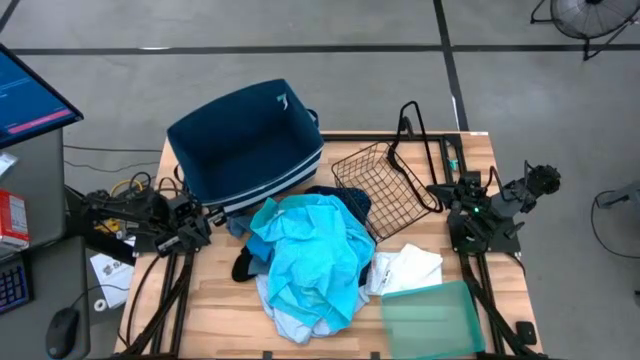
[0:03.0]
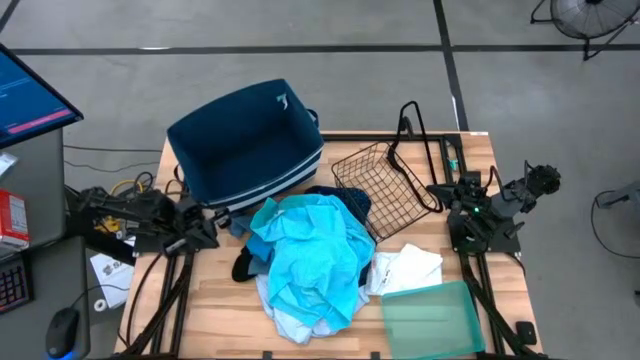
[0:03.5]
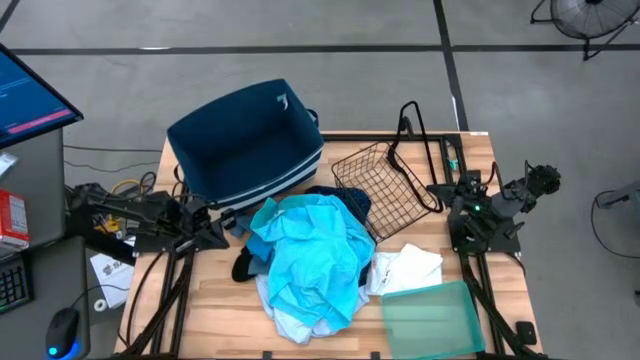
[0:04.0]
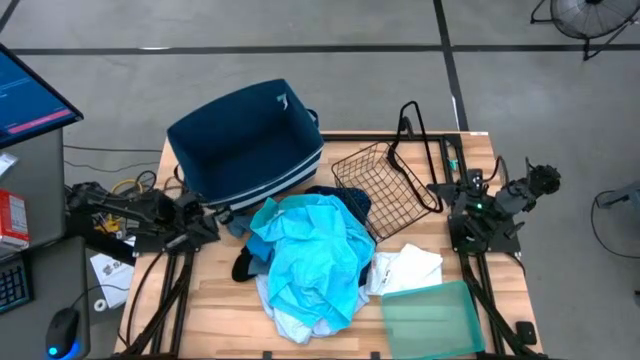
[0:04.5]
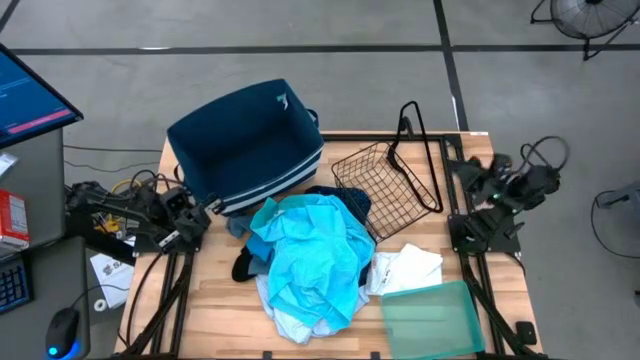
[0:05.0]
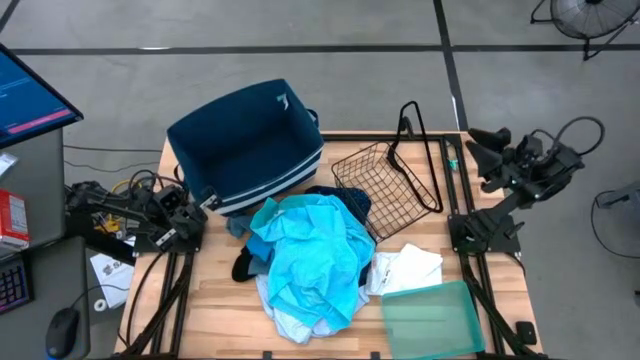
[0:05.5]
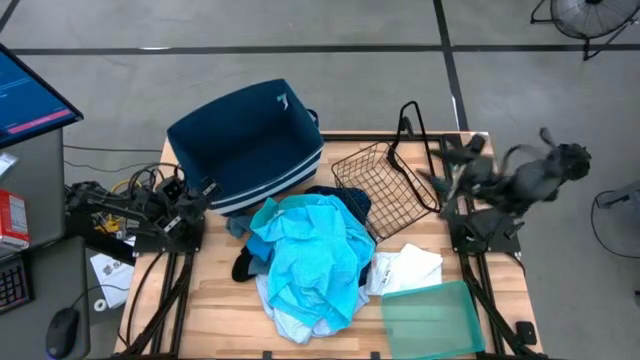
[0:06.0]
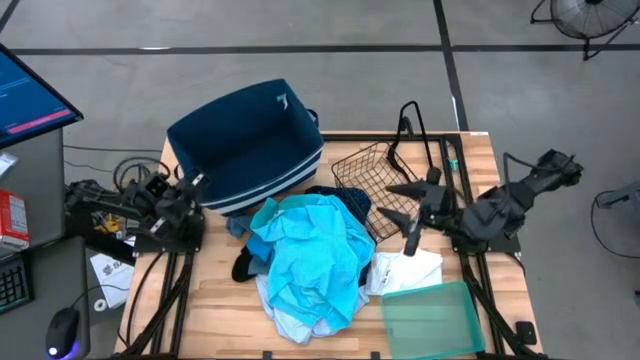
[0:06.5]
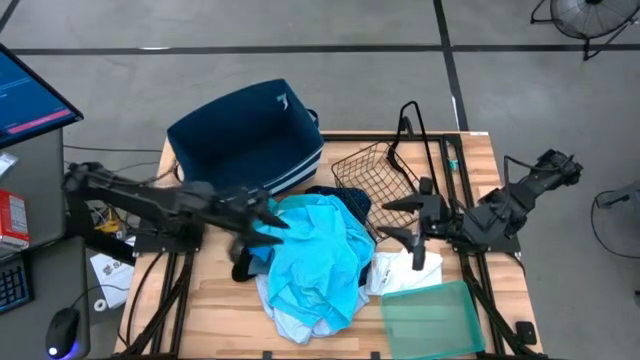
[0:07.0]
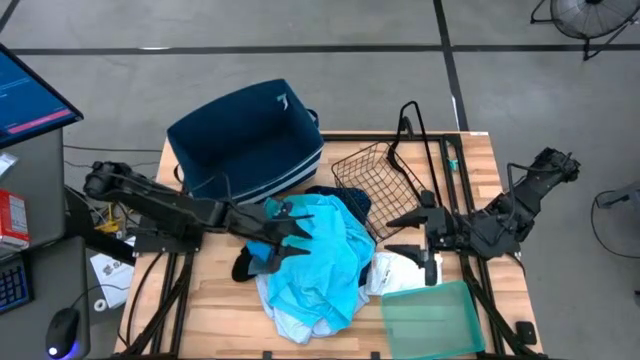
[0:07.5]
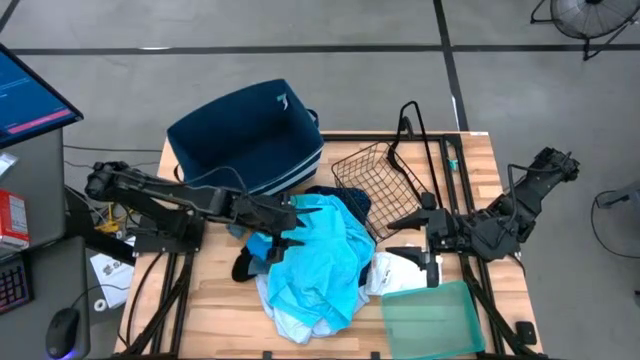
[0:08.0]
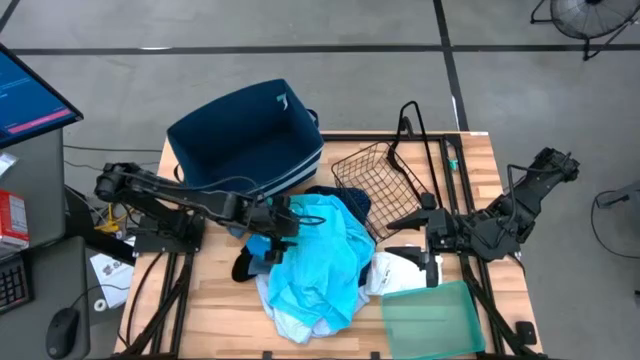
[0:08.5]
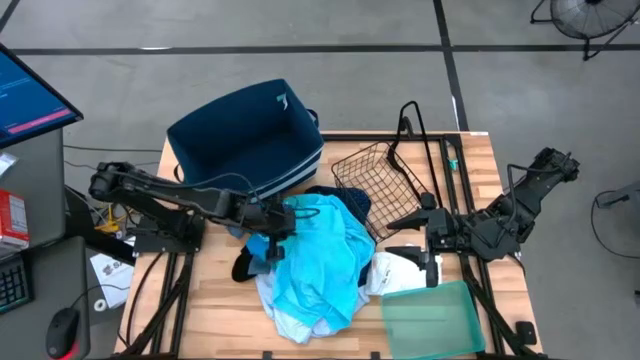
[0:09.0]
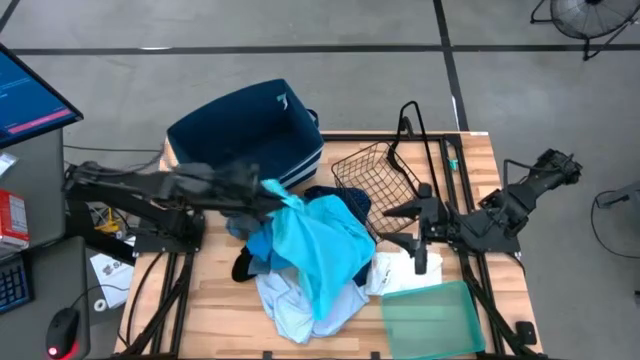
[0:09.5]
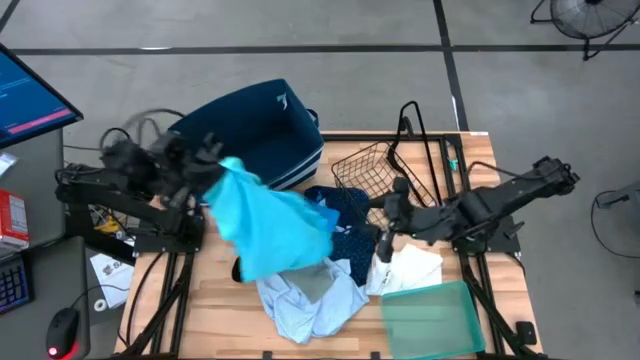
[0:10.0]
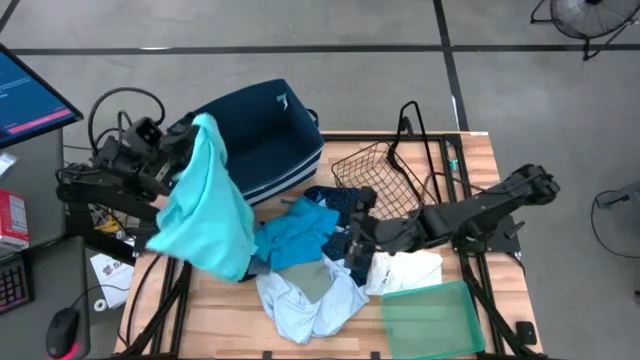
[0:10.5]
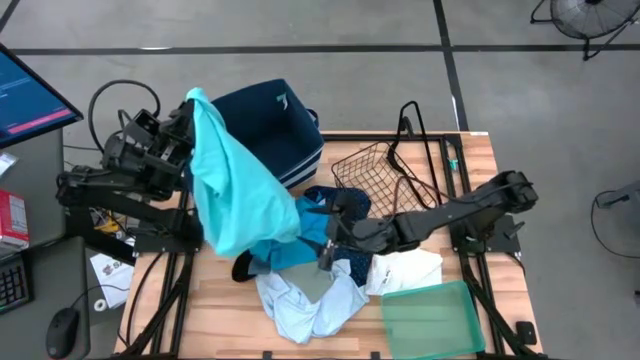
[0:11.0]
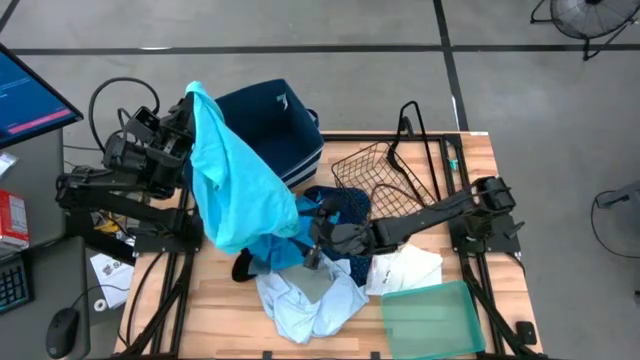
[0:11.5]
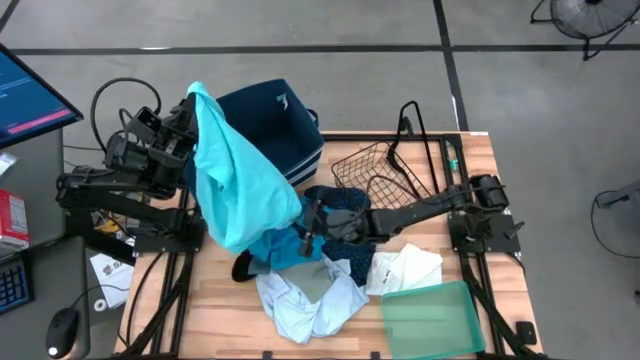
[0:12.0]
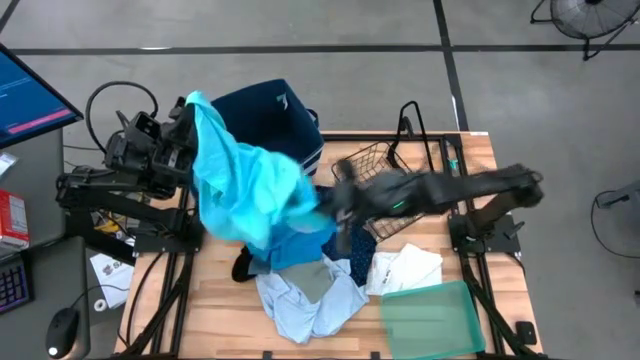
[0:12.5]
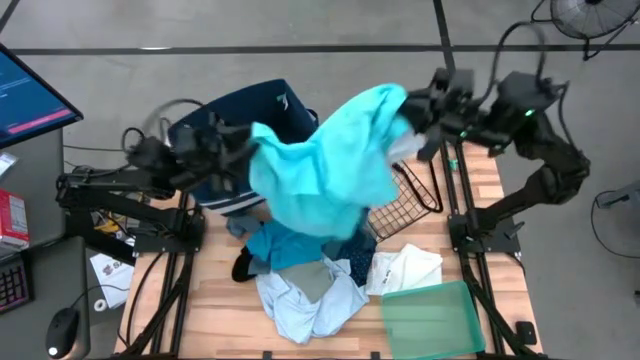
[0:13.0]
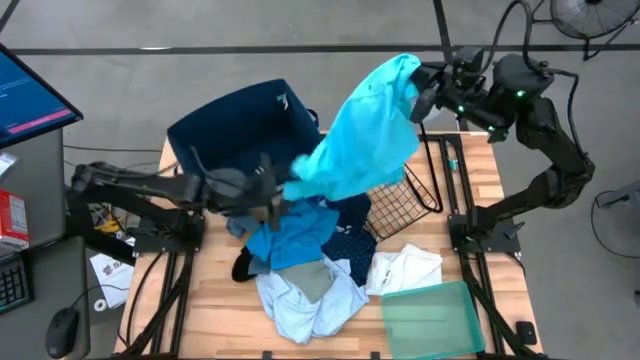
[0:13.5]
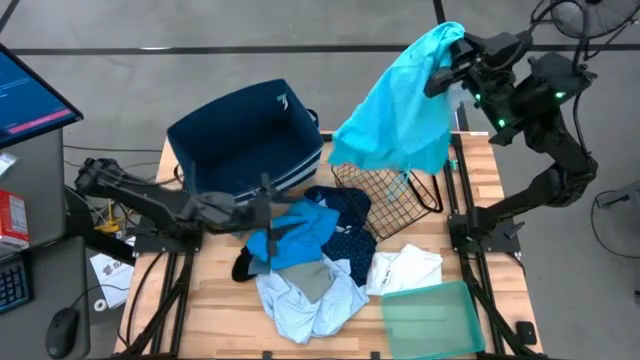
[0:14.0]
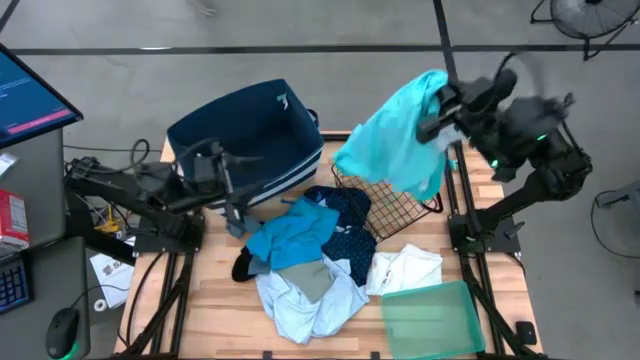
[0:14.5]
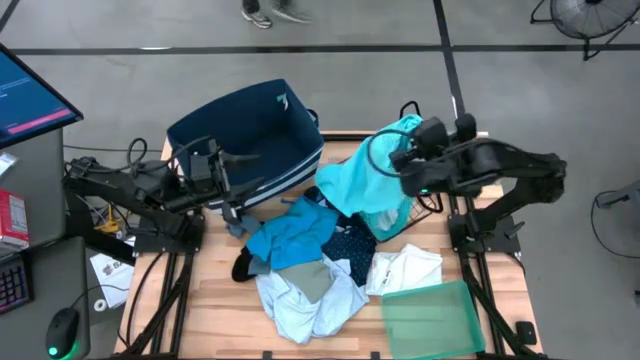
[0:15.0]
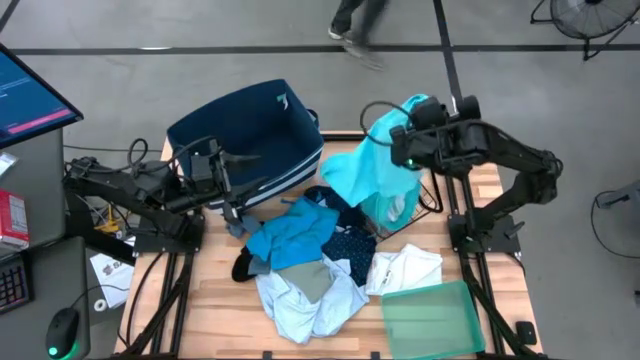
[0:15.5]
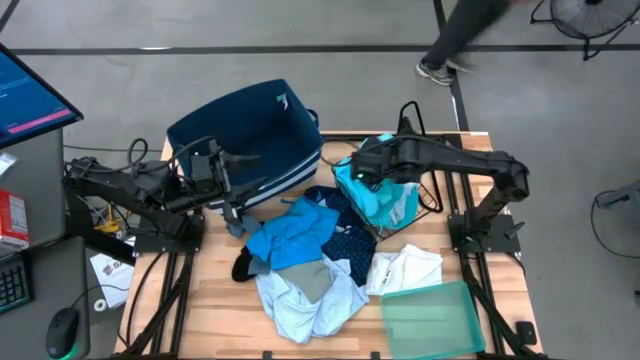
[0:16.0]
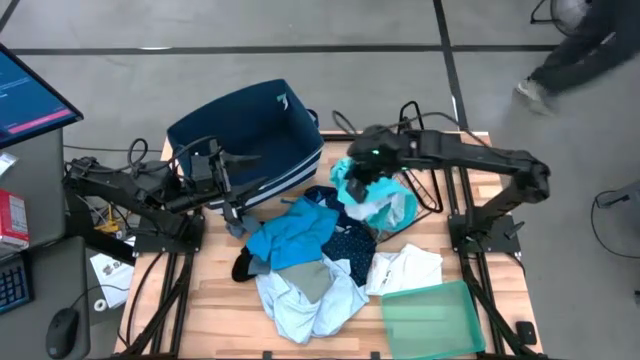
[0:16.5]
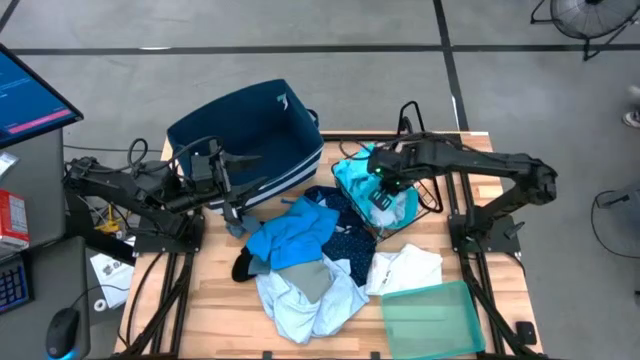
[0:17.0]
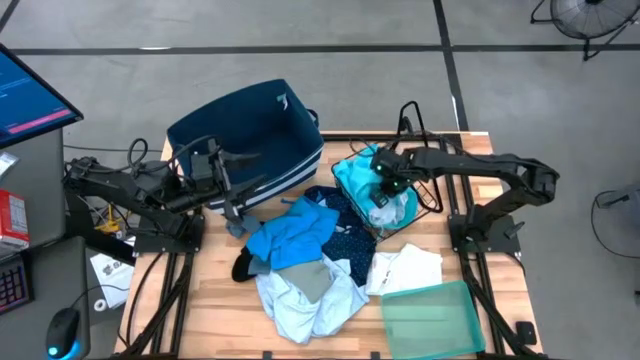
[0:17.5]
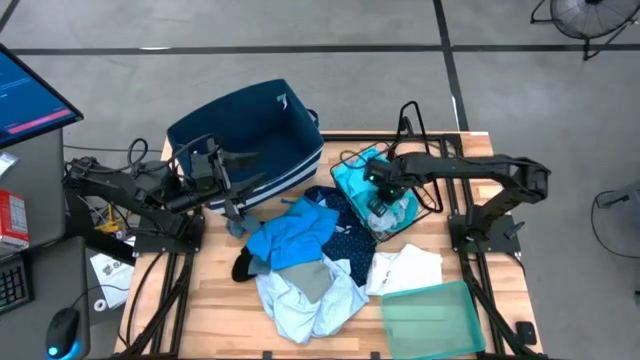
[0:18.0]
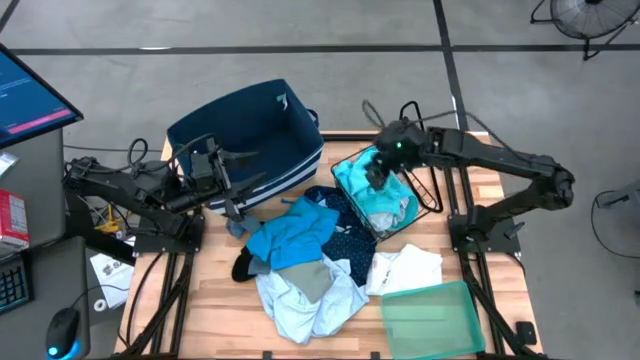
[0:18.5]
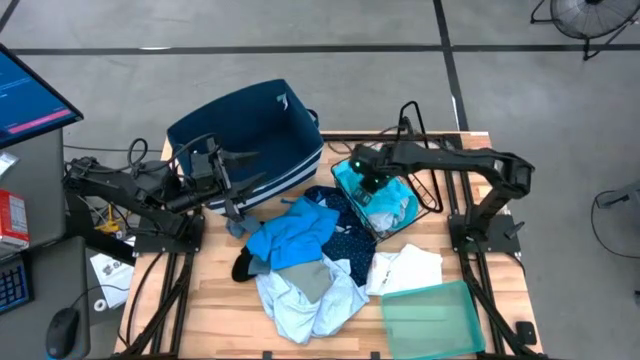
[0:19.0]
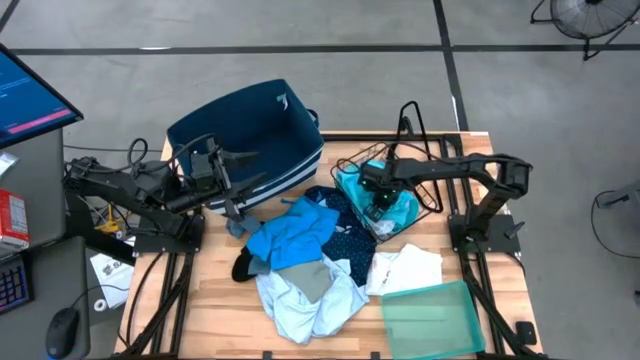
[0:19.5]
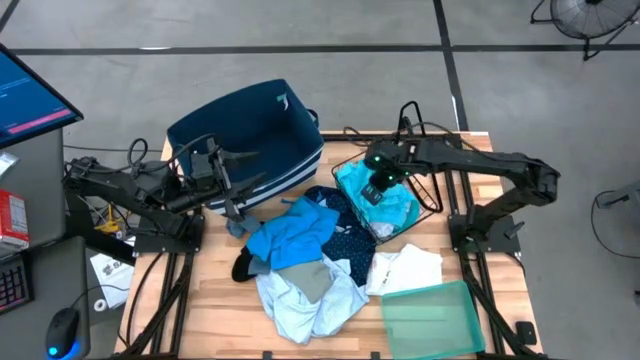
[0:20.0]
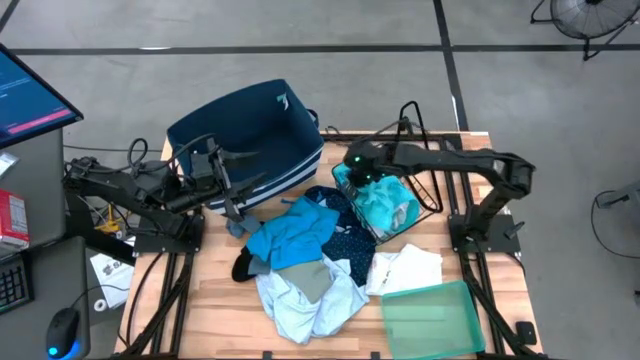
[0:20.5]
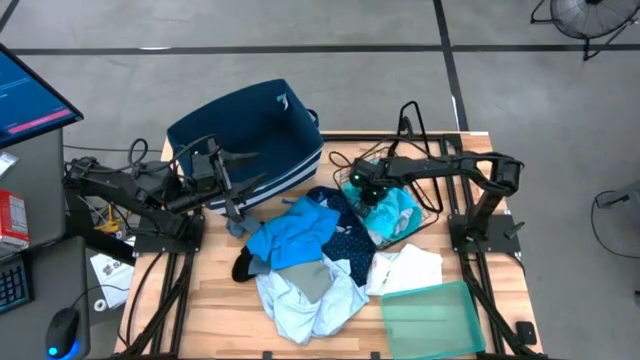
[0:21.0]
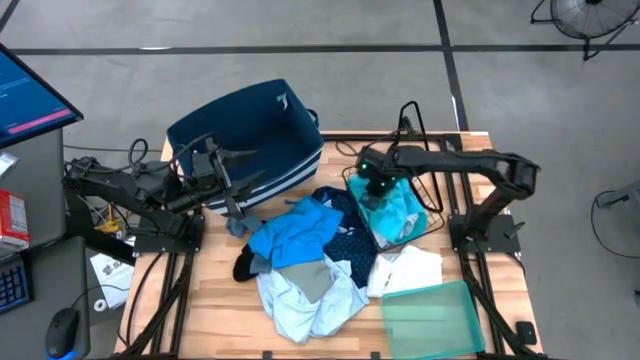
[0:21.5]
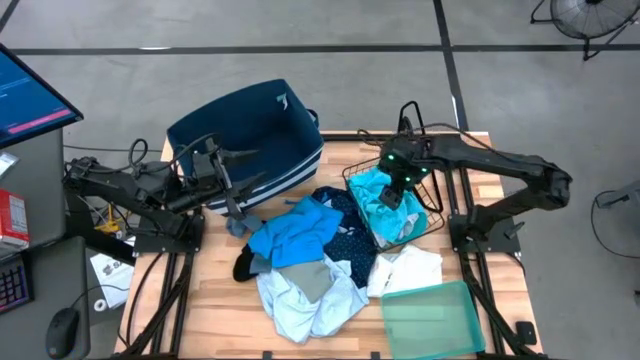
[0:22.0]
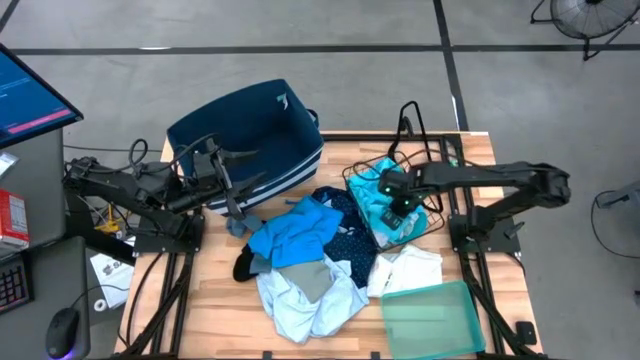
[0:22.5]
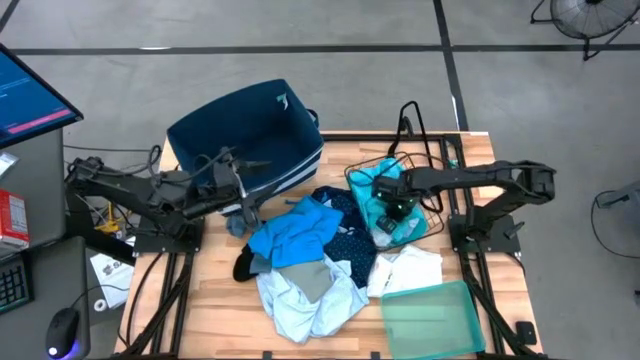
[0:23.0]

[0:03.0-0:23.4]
Task: Pick & Place Cloths
Put the light blue shorts into the wire basket
